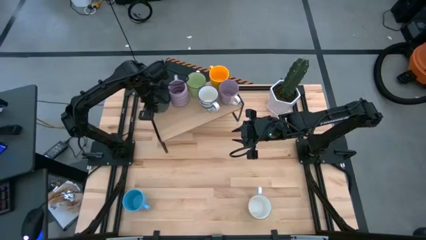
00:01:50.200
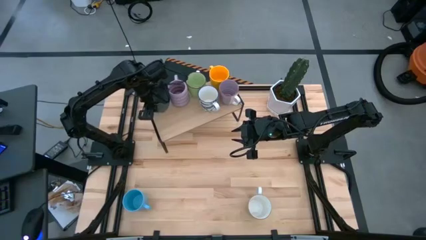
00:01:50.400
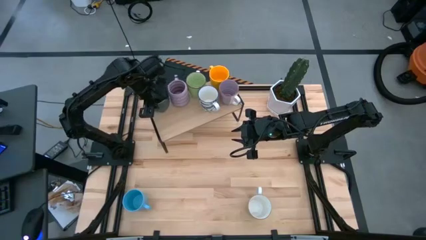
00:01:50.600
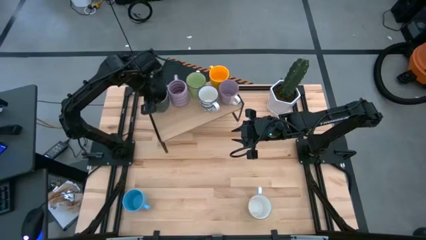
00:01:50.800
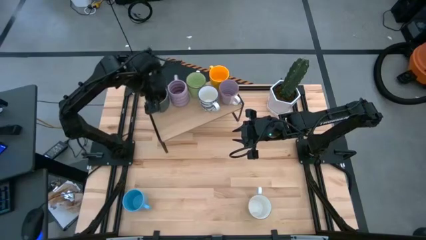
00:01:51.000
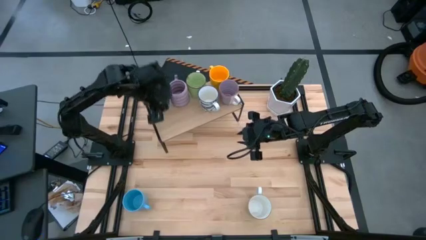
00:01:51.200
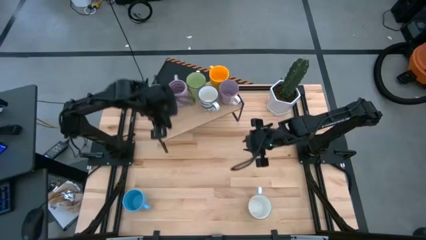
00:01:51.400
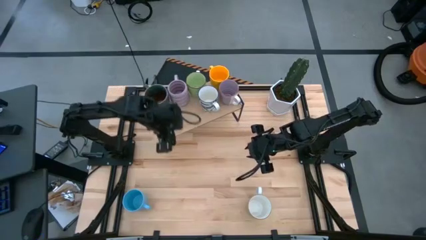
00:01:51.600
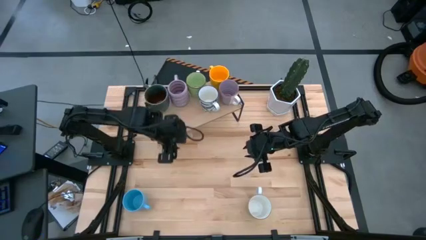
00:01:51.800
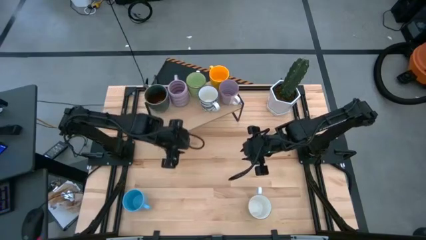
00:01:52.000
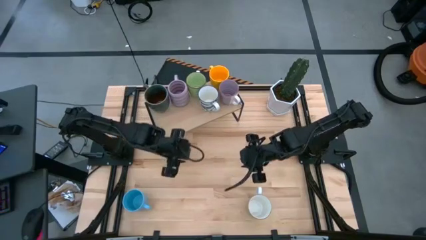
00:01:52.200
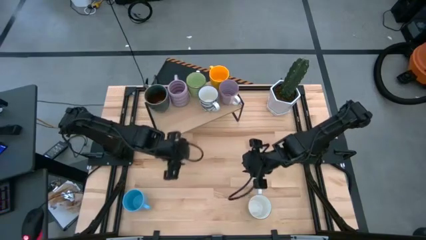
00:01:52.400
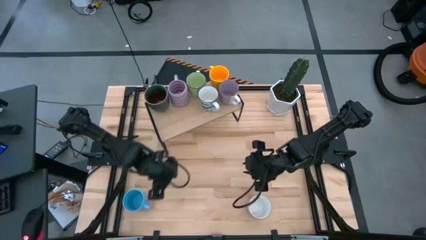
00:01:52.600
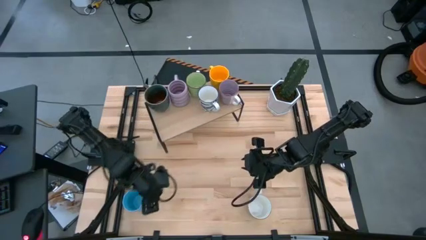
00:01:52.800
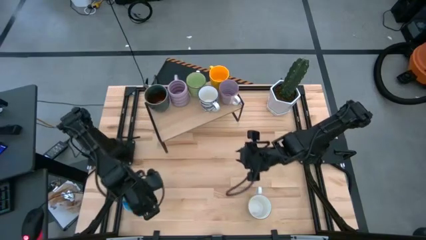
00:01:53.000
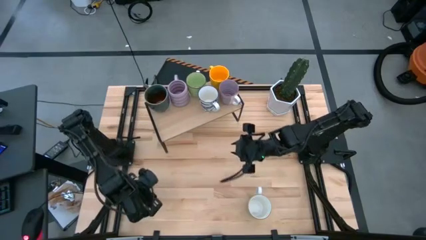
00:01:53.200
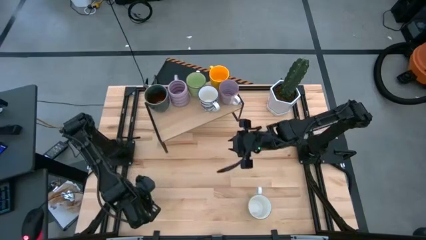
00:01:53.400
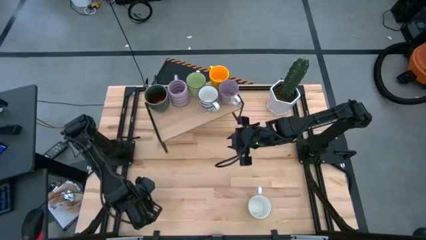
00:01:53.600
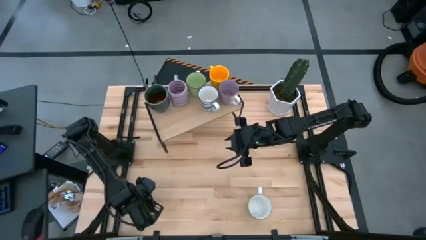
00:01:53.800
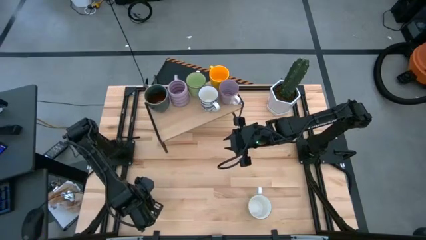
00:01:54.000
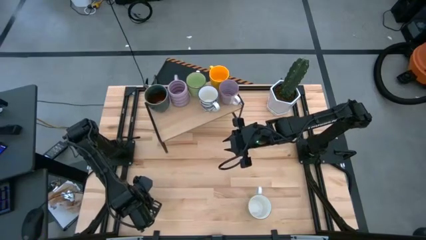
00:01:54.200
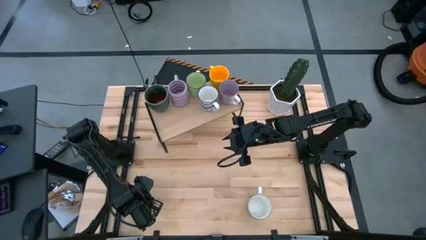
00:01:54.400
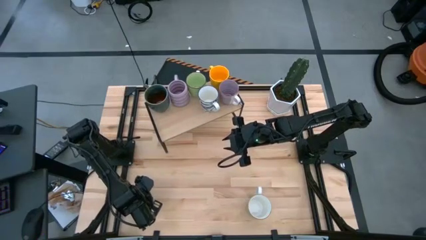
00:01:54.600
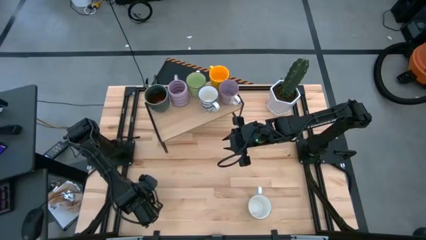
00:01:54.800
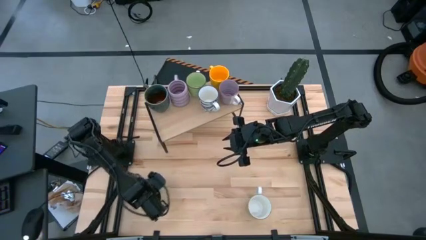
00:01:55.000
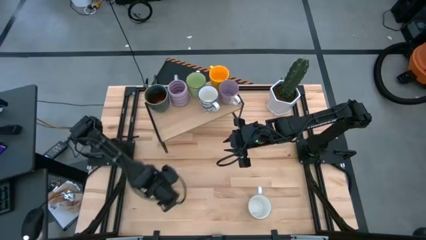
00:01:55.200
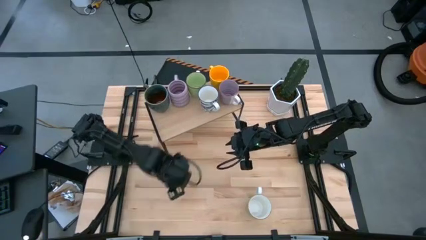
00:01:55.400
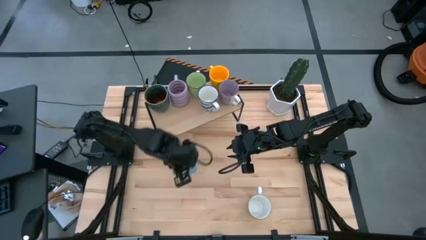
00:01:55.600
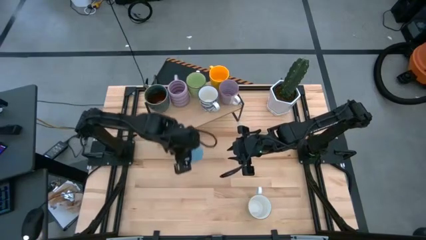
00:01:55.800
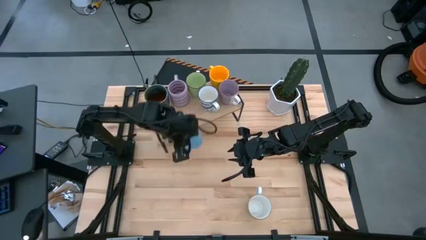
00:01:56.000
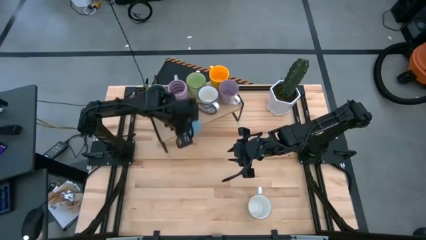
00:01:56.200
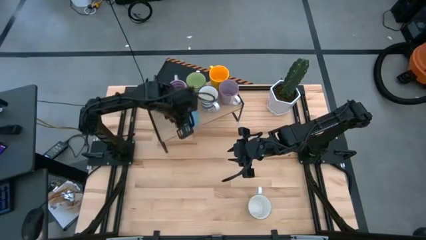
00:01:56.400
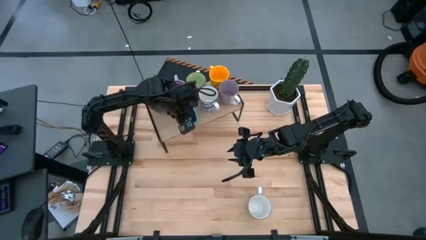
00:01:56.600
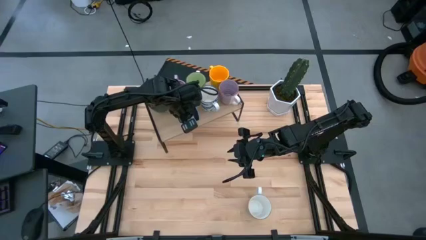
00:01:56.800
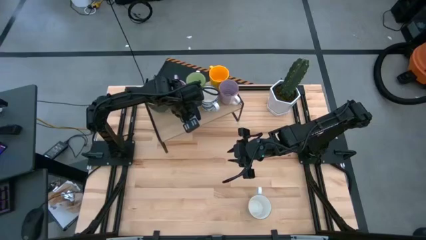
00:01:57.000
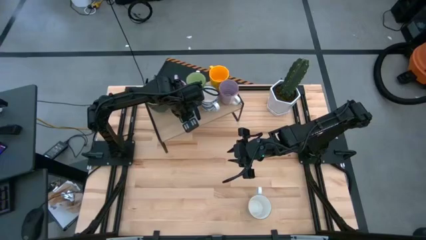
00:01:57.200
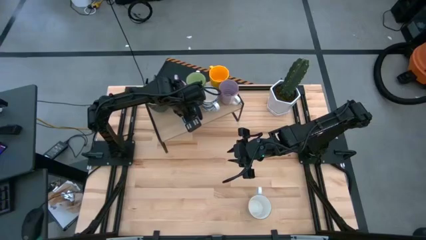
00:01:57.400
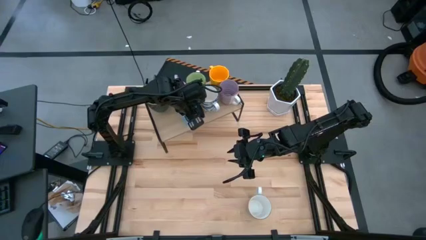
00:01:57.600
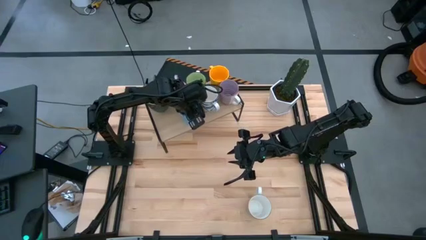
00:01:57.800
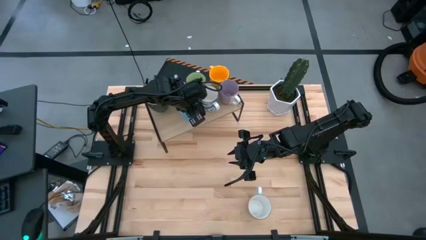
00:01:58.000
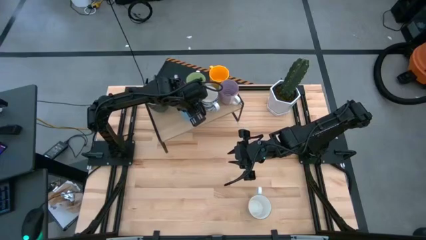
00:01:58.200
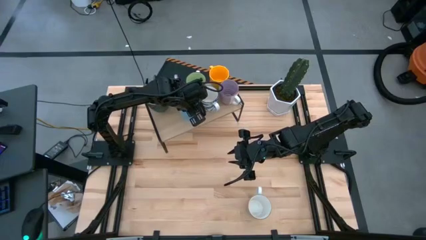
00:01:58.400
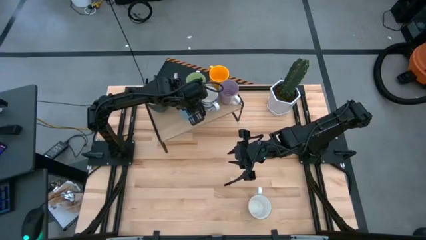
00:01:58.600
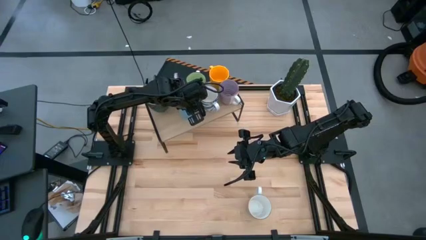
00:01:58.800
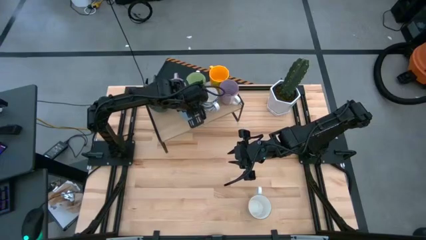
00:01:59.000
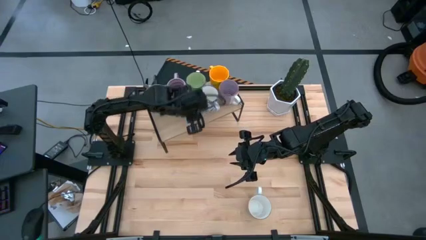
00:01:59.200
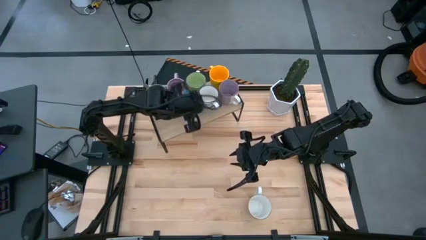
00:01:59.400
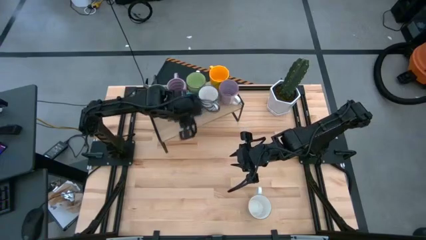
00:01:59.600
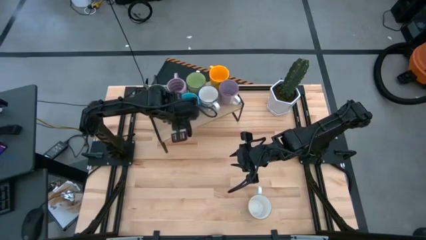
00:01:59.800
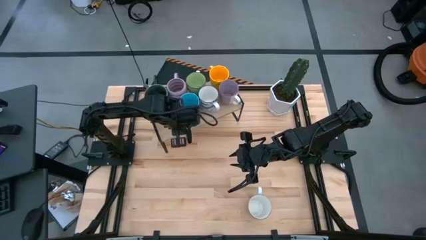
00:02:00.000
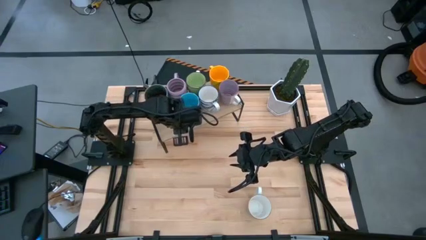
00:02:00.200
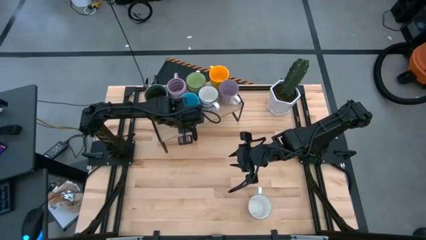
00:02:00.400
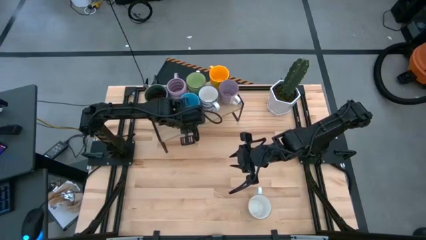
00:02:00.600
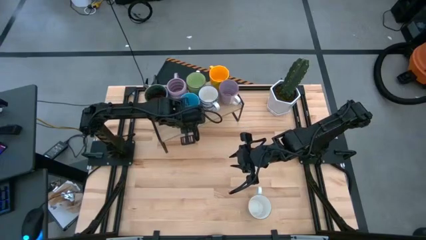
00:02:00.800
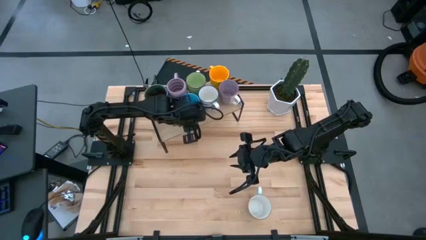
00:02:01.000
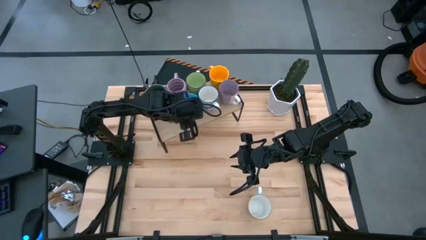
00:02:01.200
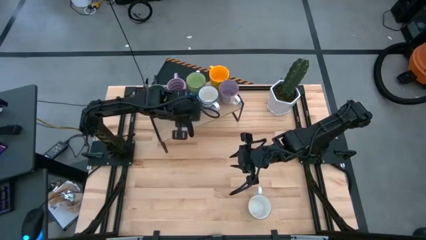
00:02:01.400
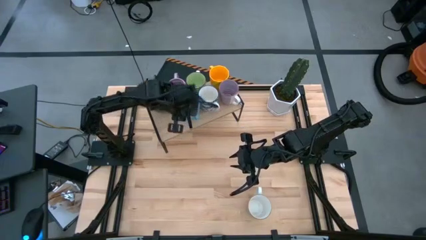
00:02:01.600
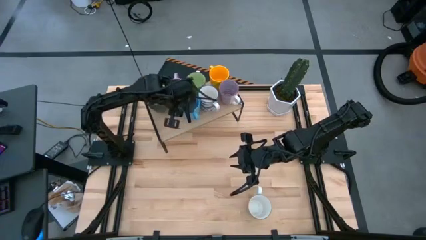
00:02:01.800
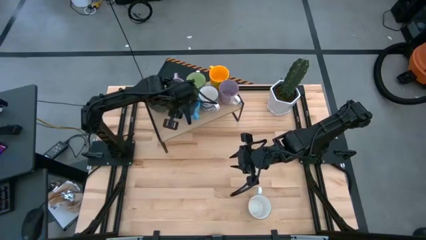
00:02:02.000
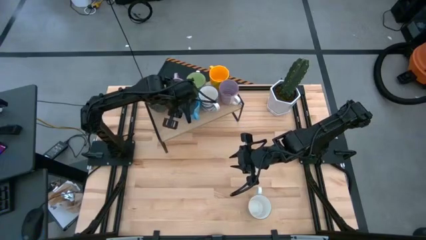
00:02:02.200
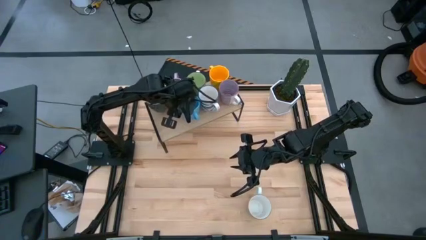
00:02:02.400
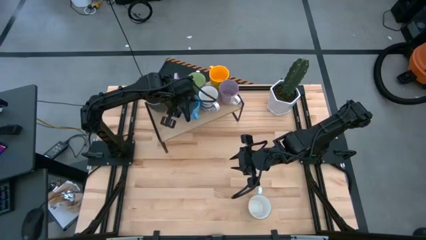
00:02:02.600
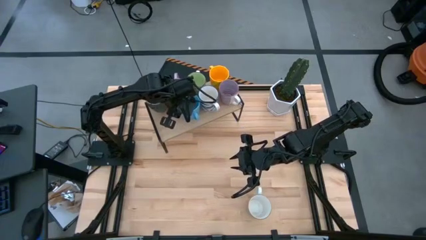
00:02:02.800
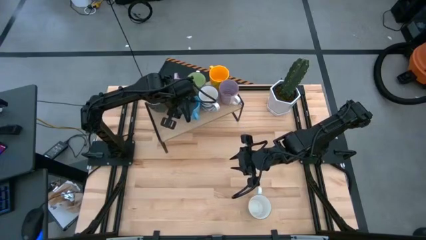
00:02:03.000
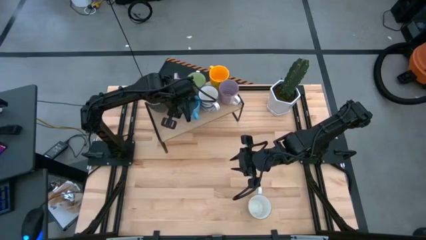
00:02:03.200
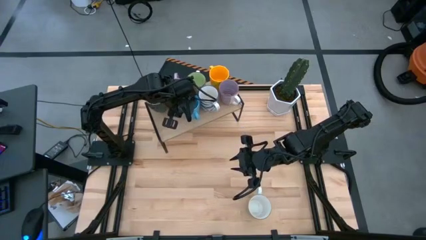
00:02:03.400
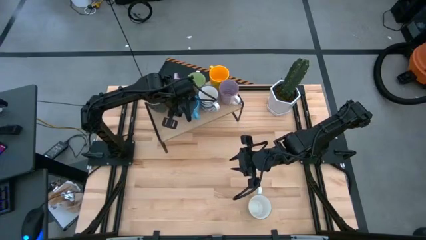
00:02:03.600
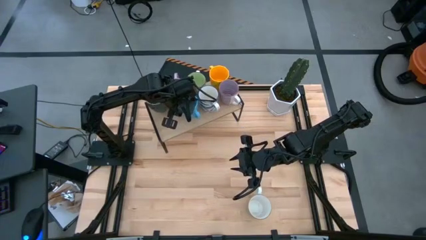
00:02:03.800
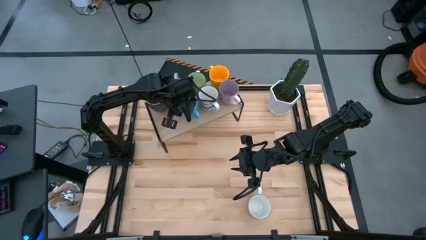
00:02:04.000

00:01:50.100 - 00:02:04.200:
Task: Place coffee mugs
Put the blue mug on the shelf
